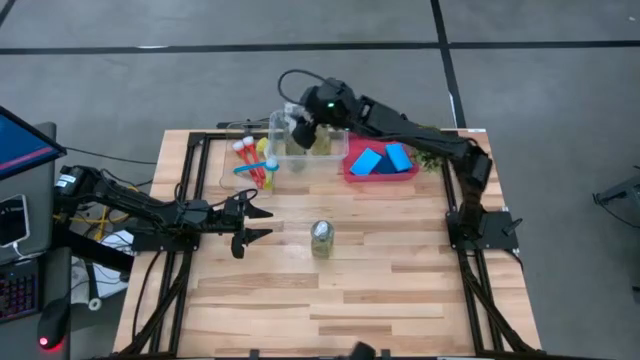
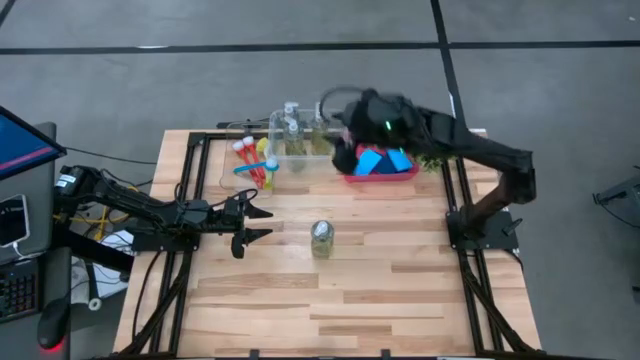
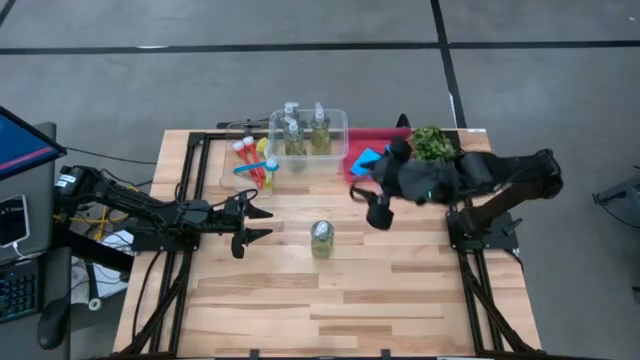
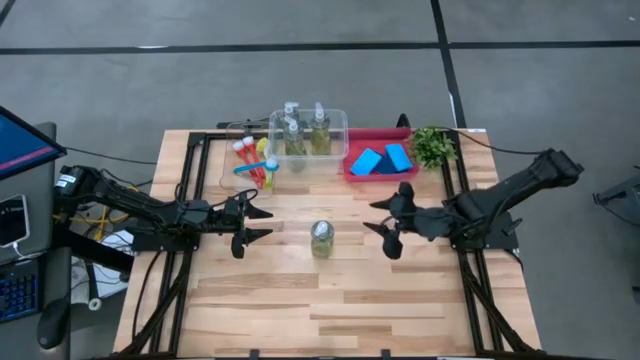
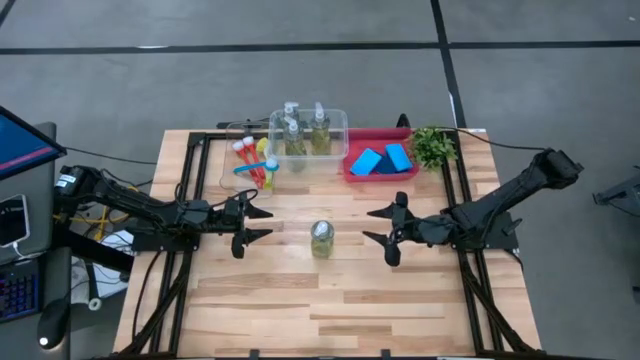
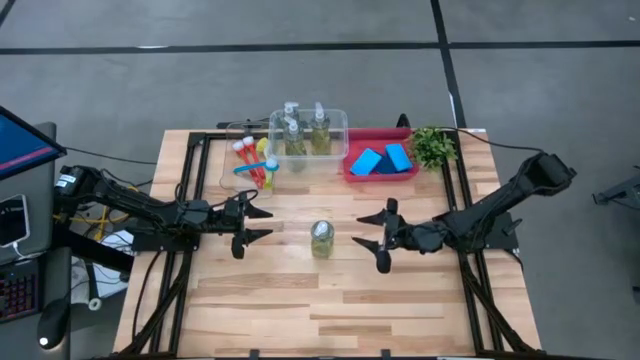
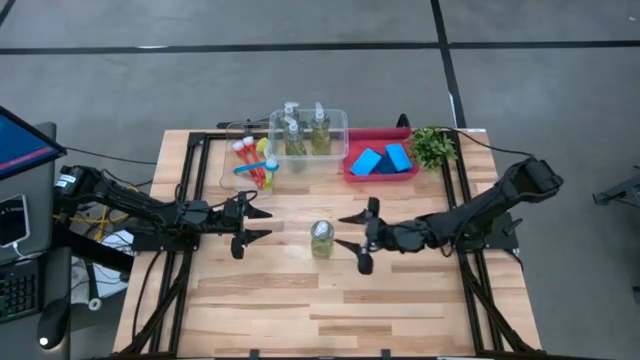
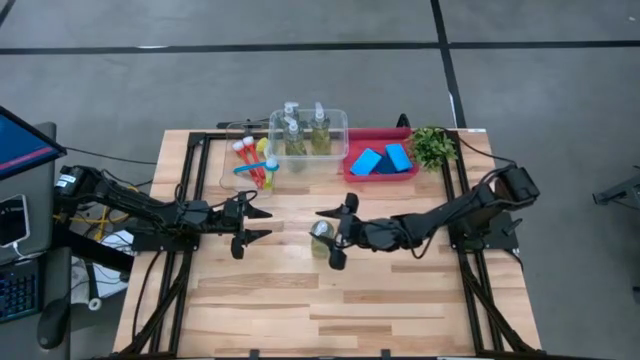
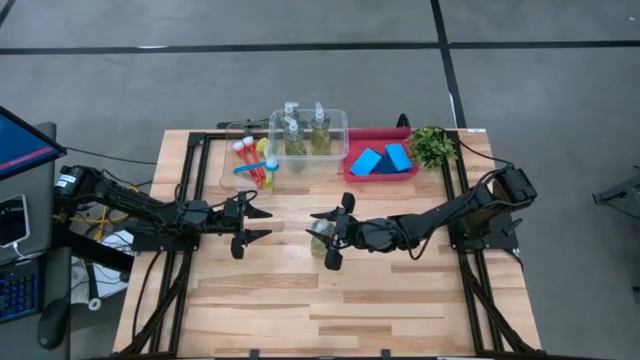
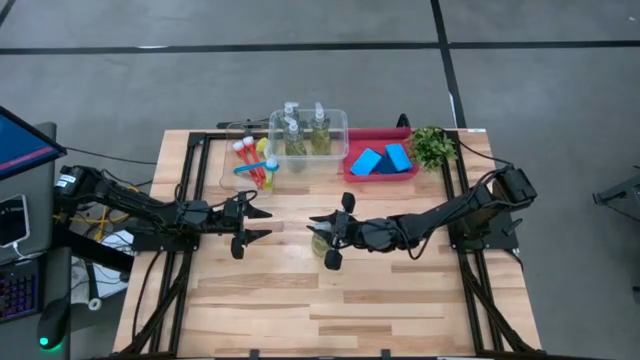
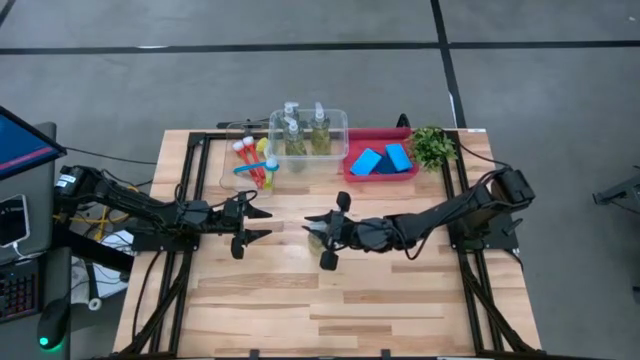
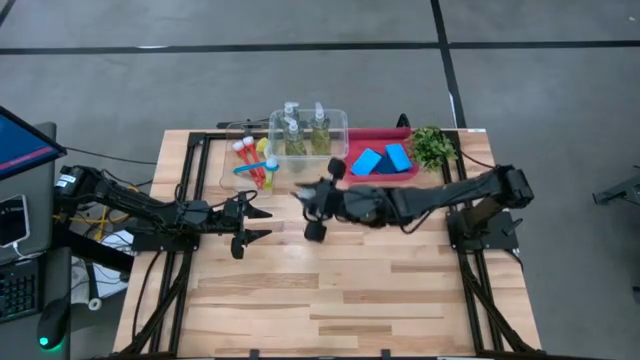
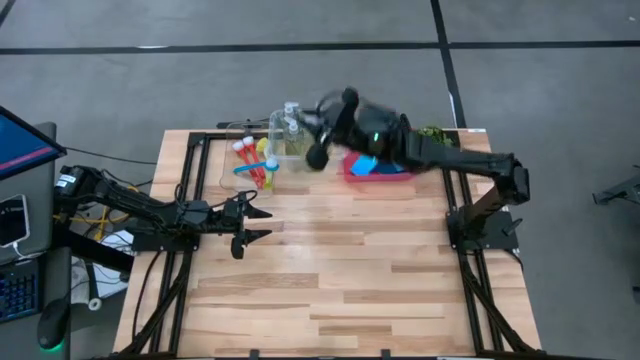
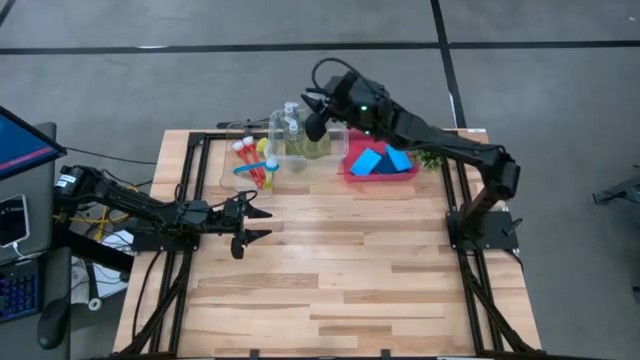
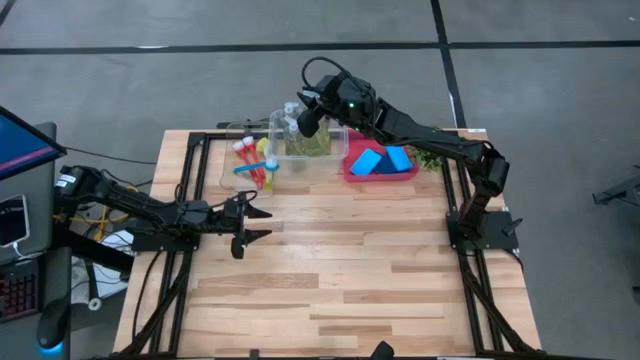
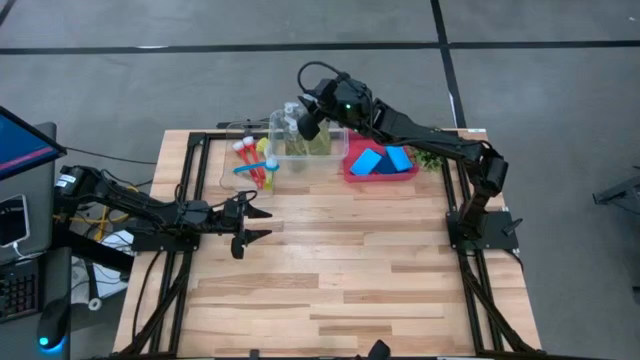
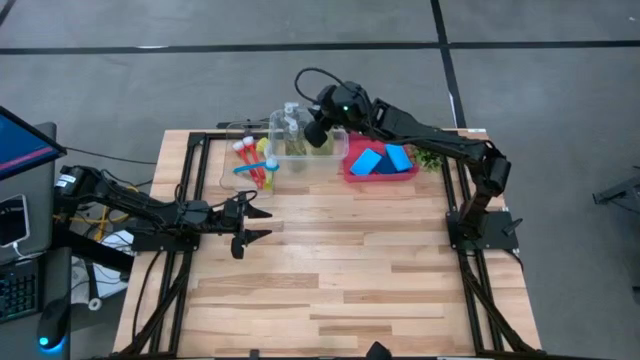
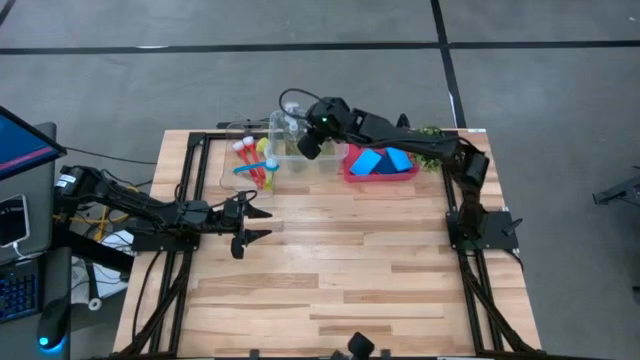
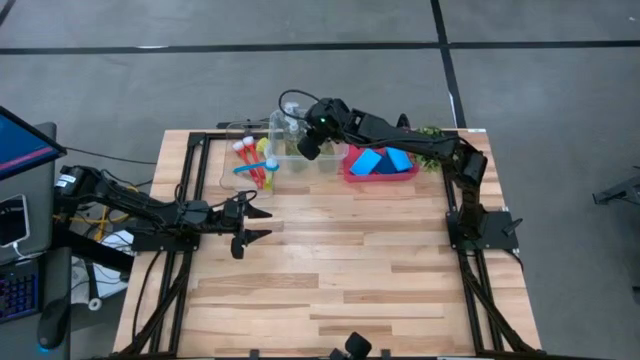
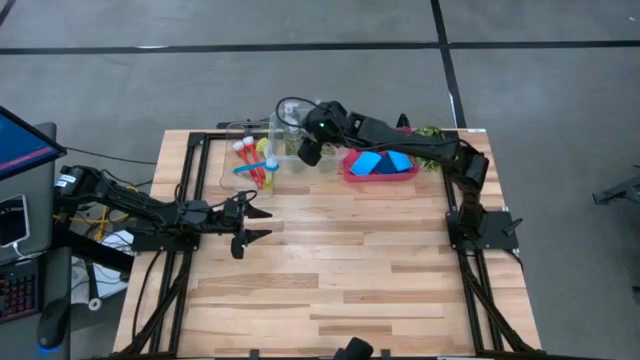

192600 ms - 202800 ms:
Task: Pick & Place Kitchen Sink Supplies
Put the yellow dishwashing liquid dispenser bottle into the right transparent bin

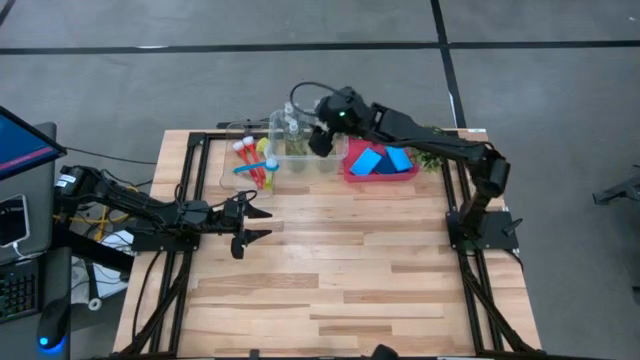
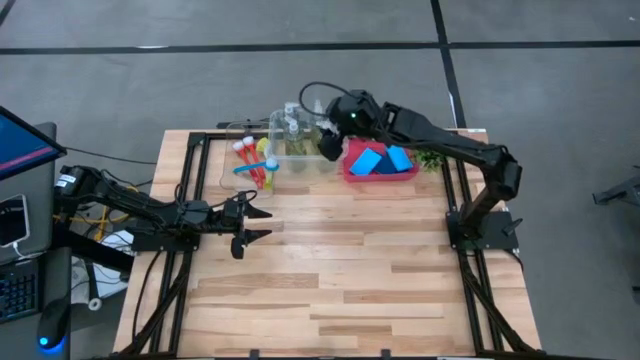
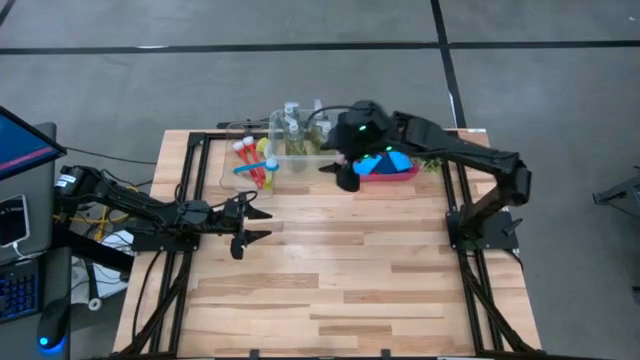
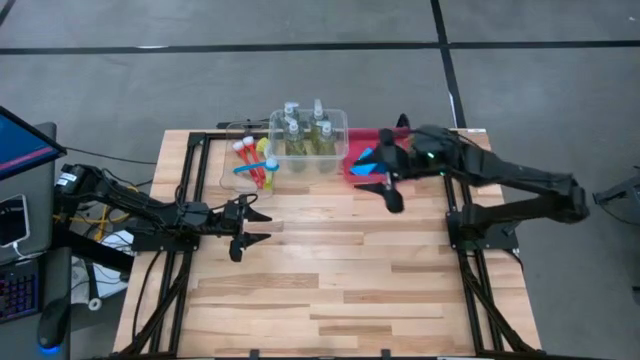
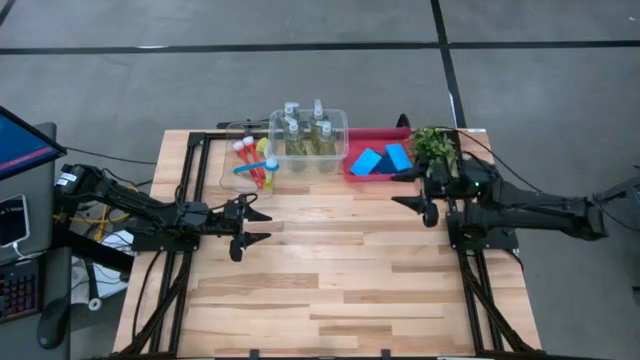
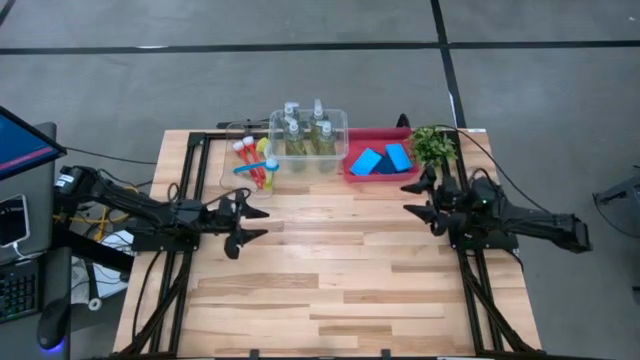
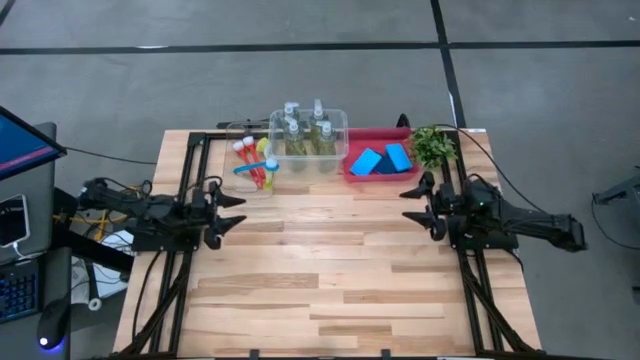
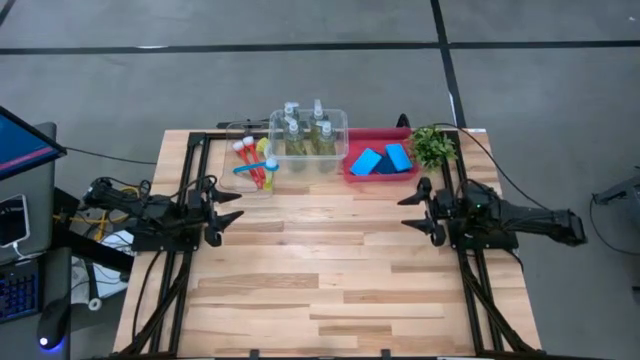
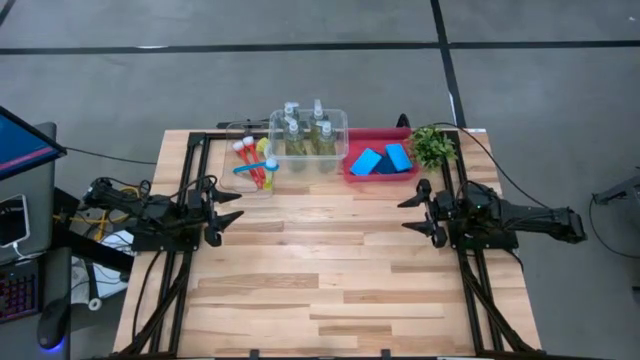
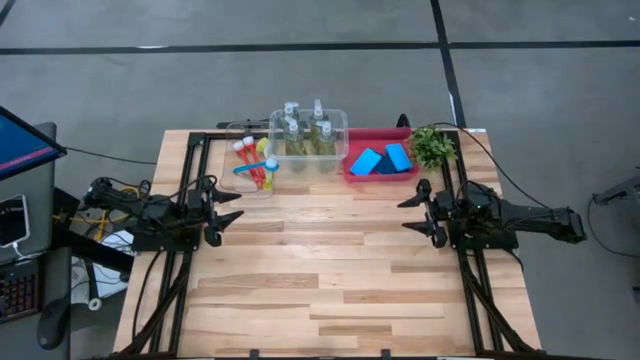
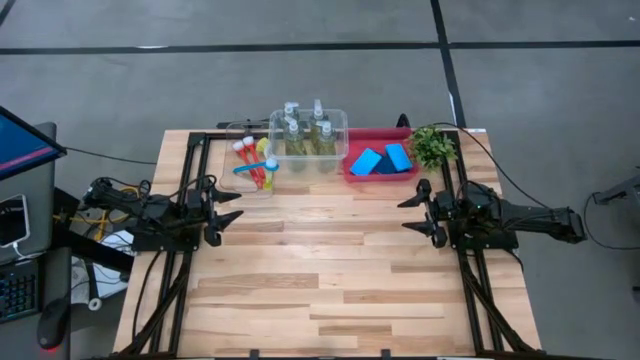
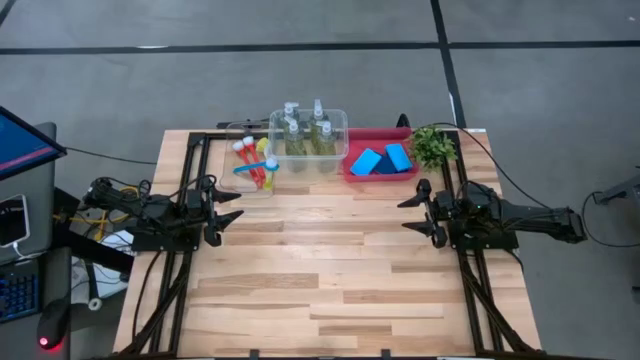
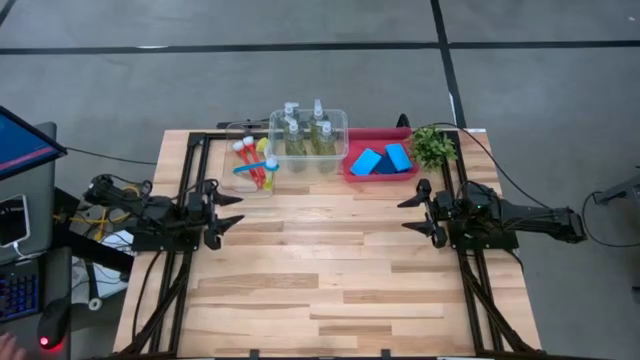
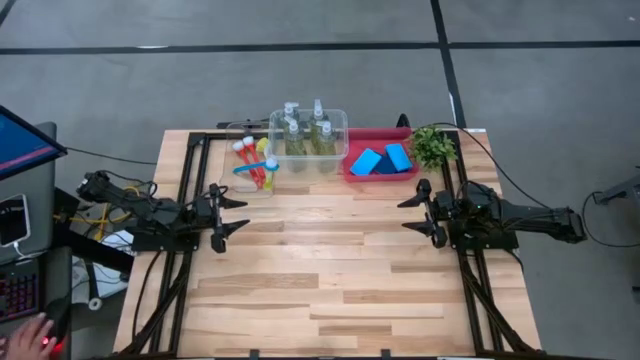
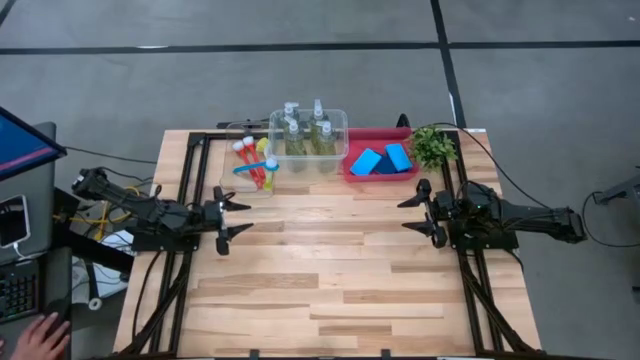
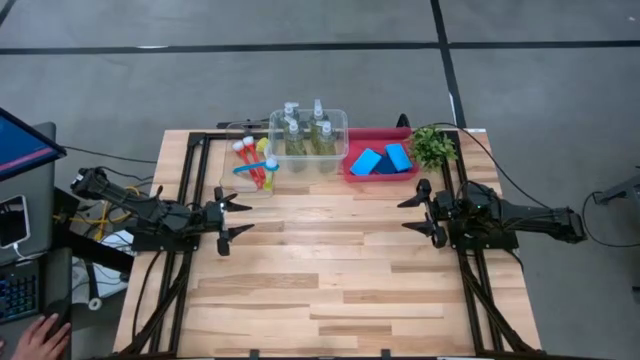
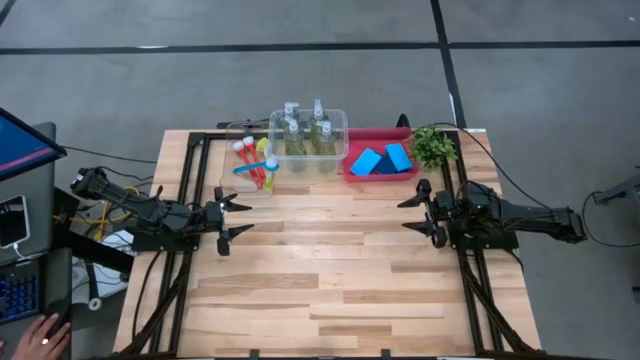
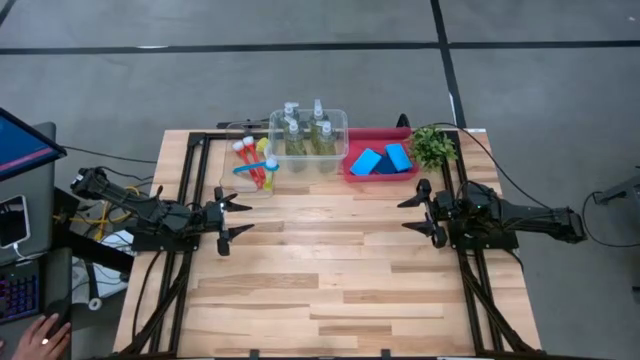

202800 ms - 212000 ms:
Return to Home Position

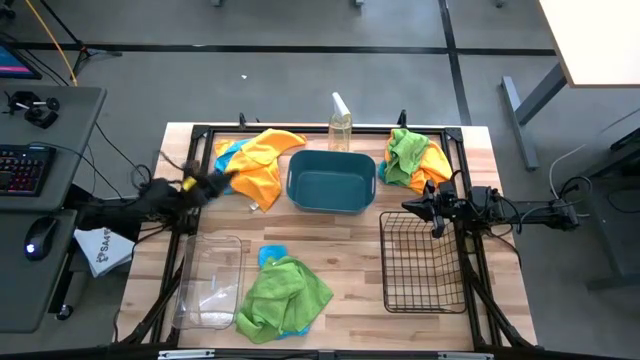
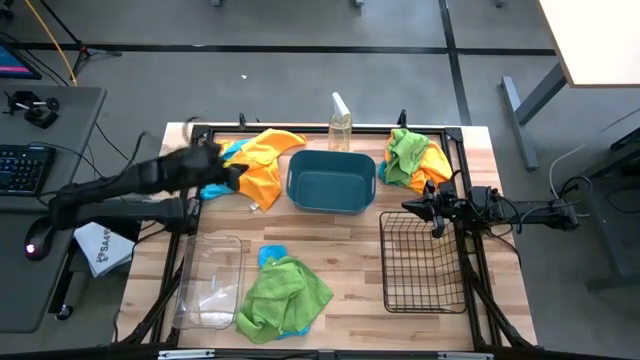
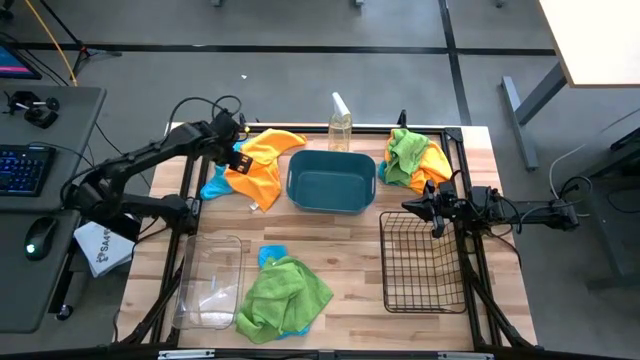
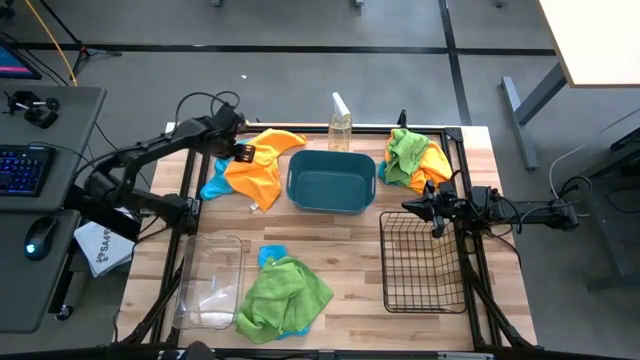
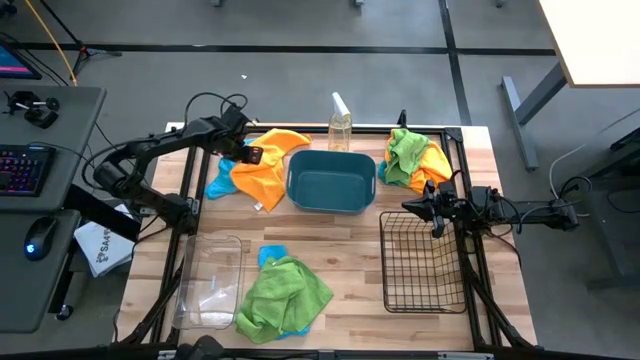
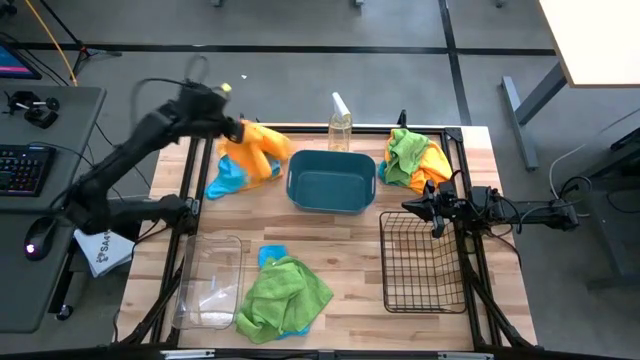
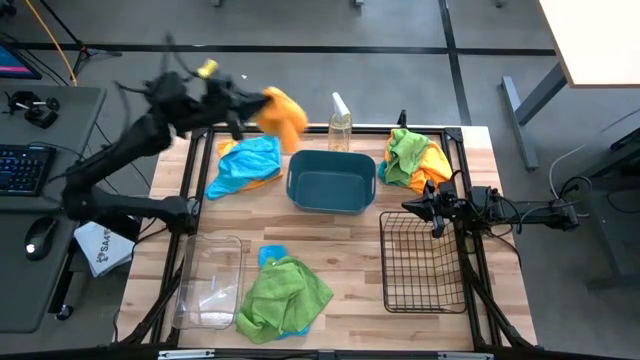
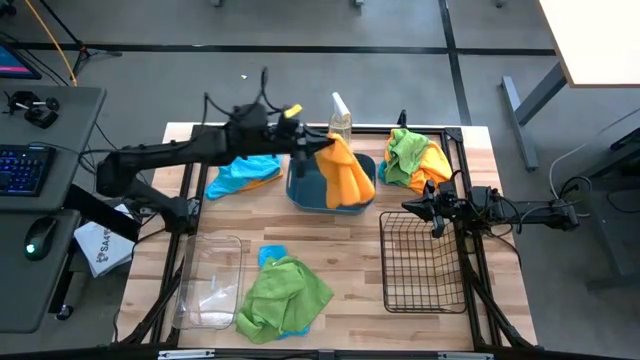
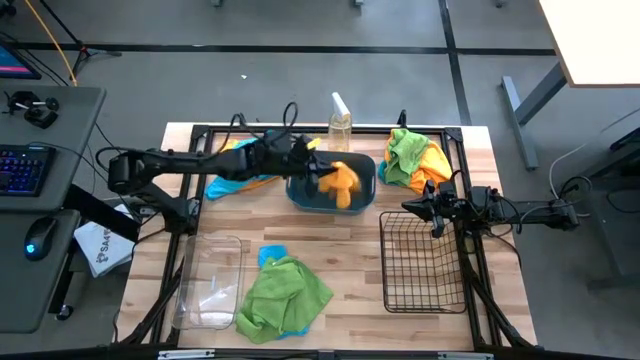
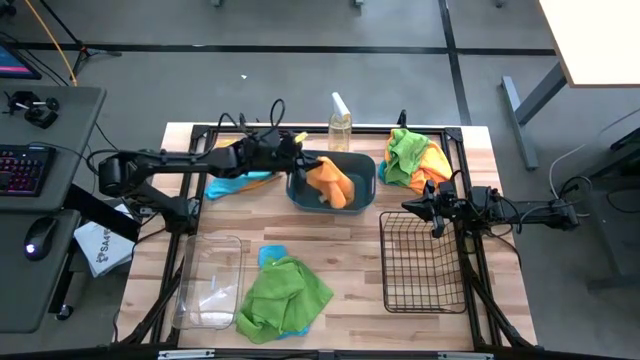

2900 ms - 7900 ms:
Task: Sort microfiber towel by color & place in baskets
Put the left yellow towel into the blue bin
